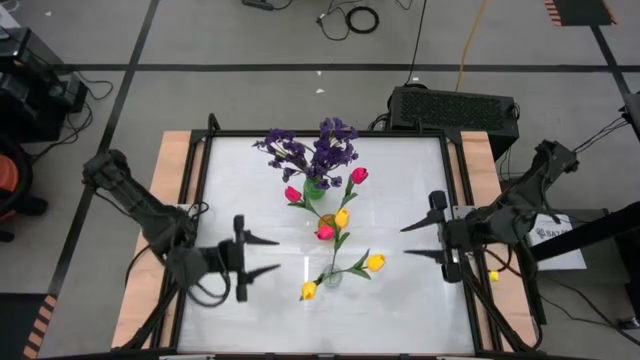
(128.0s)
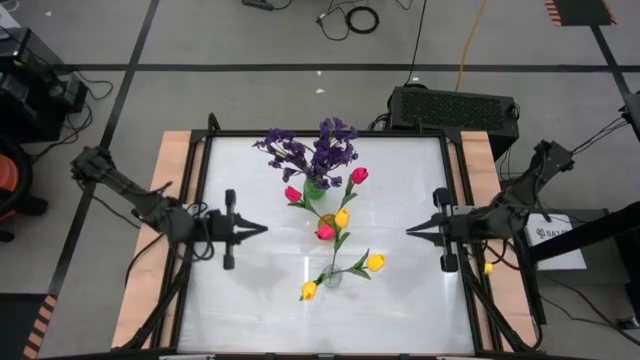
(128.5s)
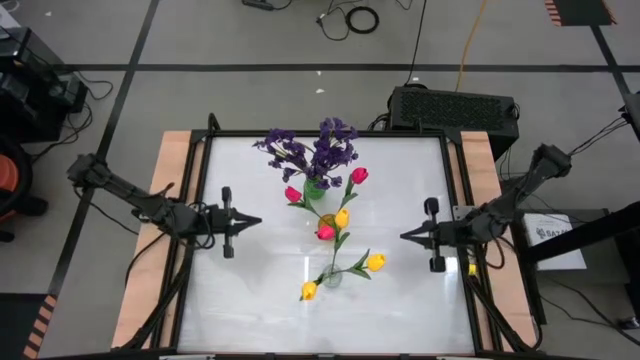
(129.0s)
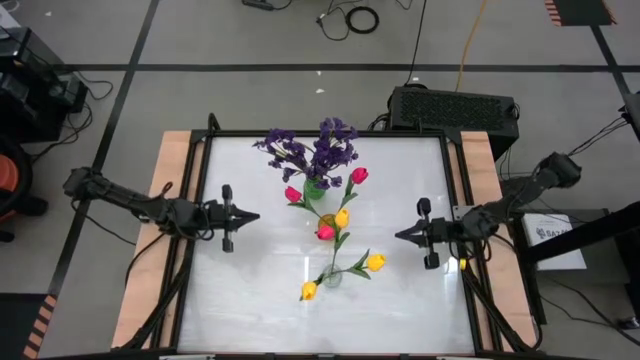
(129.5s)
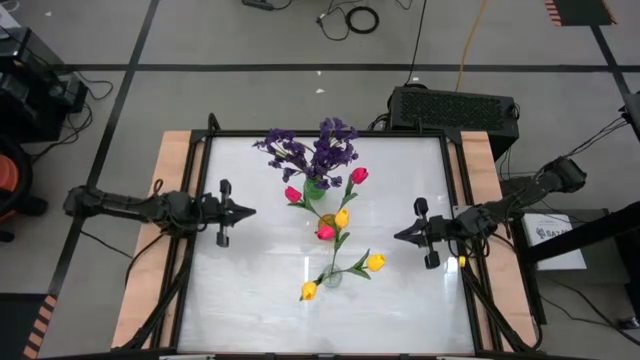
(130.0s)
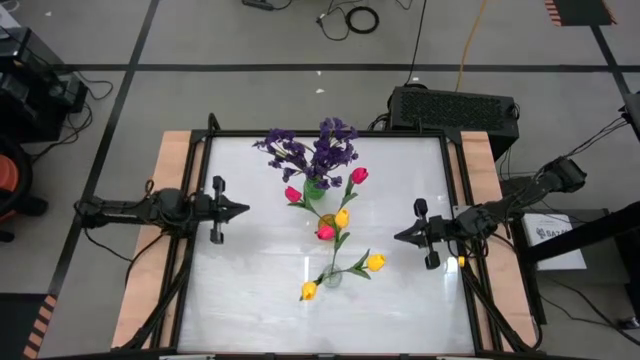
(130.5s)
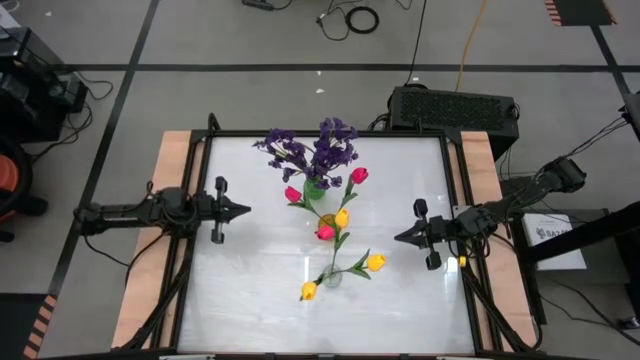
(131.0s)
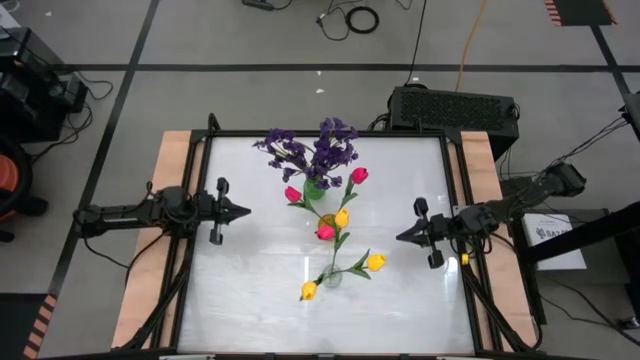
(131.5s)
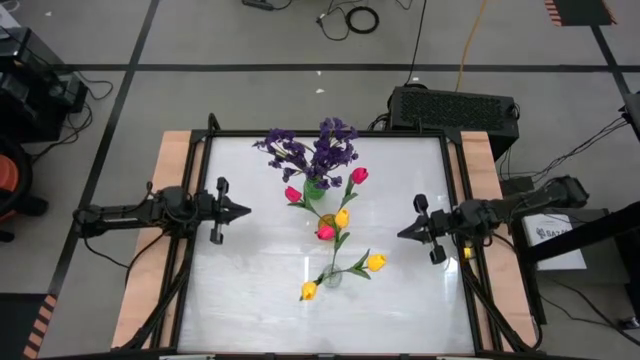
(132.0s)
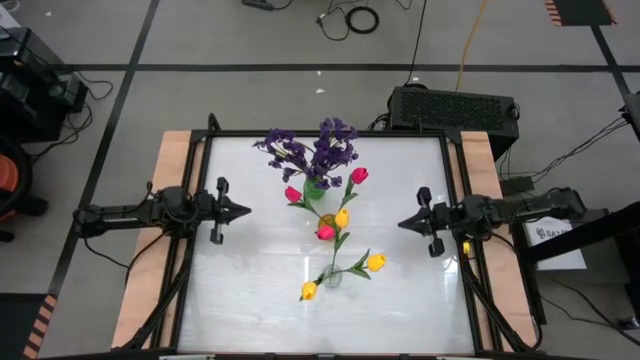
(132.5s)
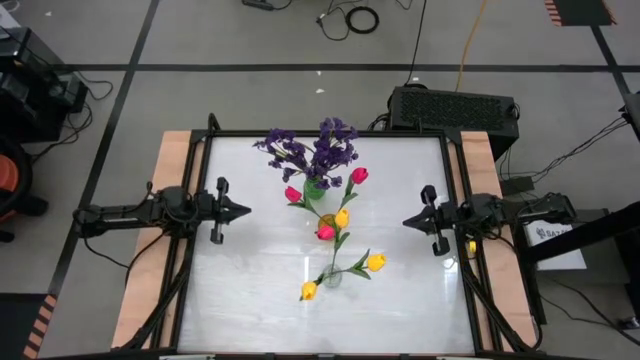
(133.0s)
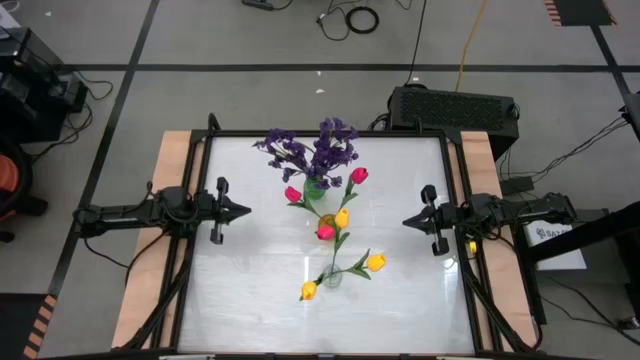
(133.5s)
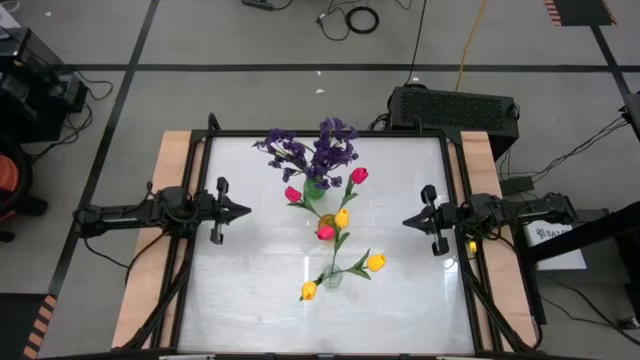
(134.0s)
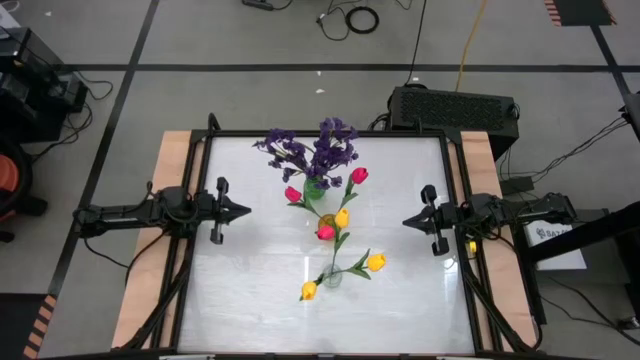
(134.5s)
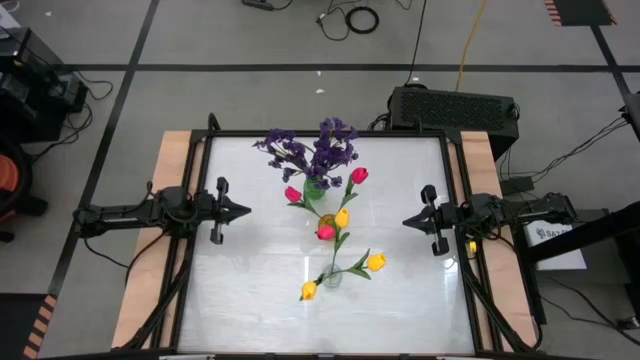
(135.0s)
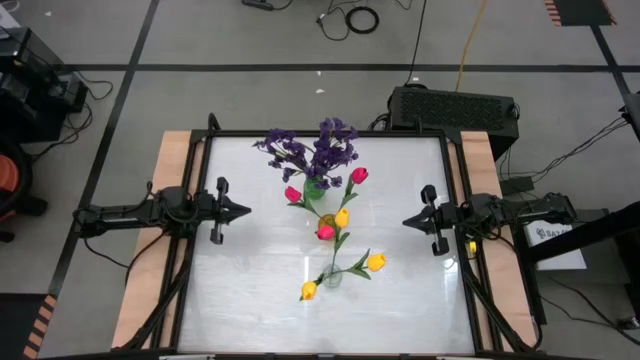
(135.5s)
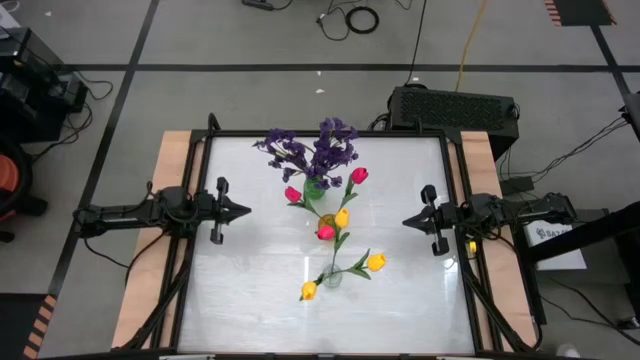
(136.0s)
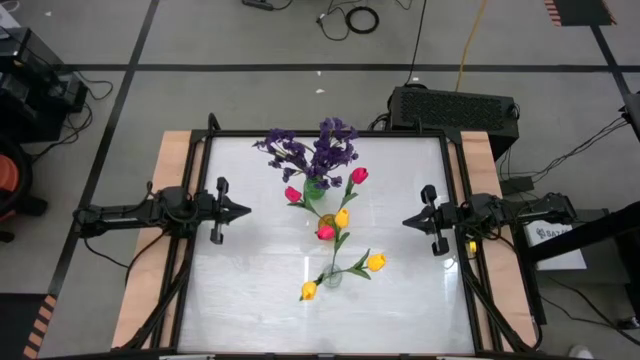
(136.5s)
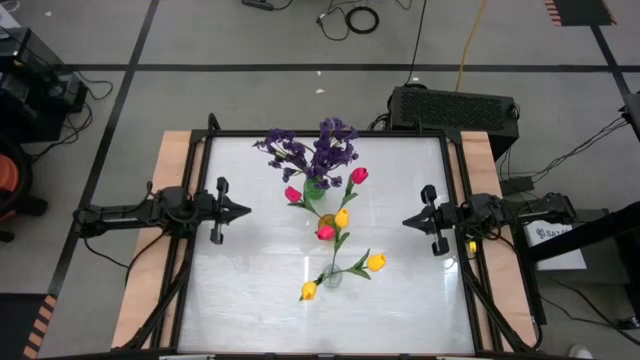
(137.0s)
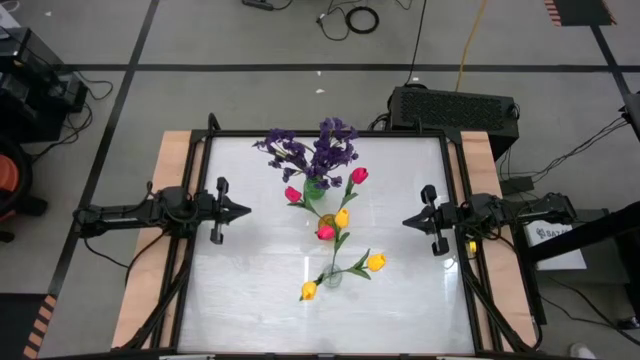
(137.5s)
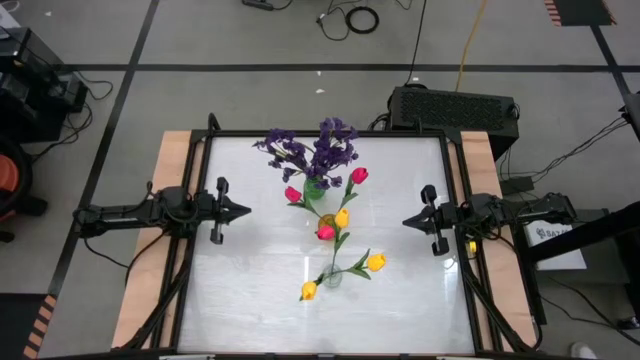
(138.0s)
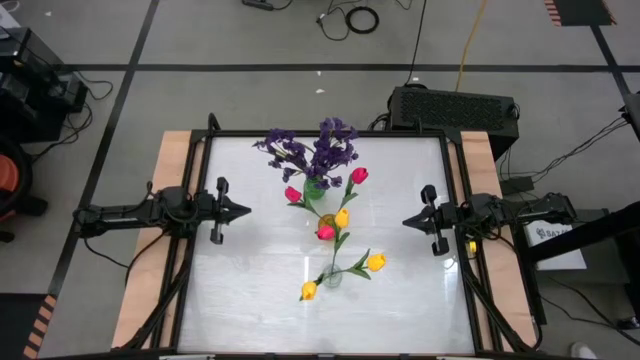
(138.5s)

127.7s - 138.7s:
Task: Sort flowers into vase by color
Return to Home Position

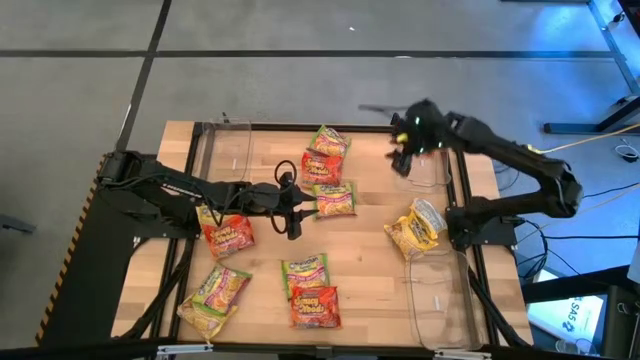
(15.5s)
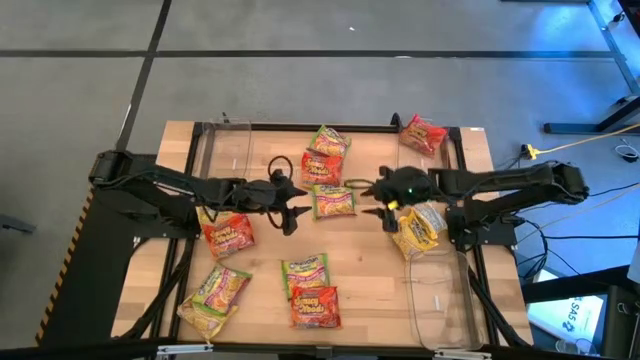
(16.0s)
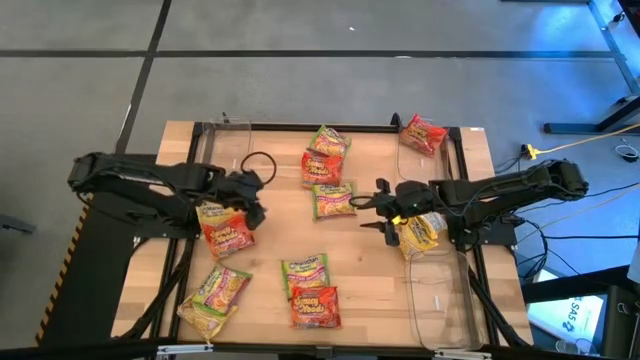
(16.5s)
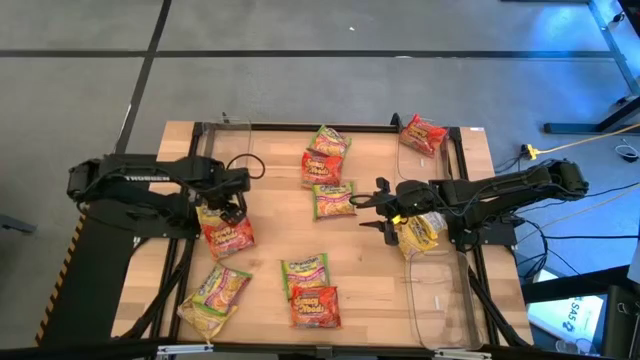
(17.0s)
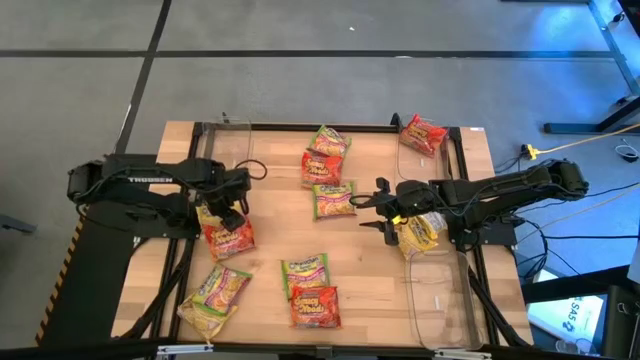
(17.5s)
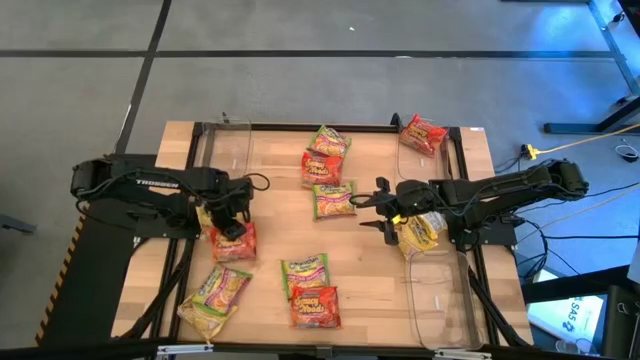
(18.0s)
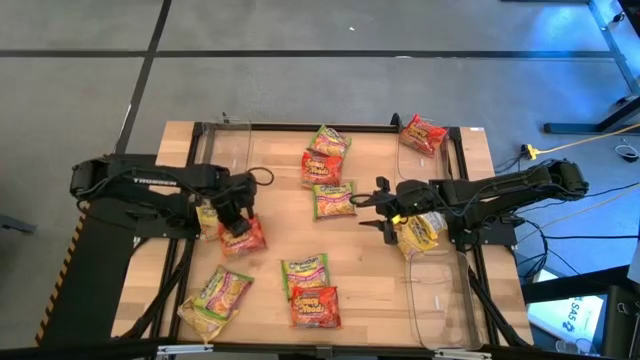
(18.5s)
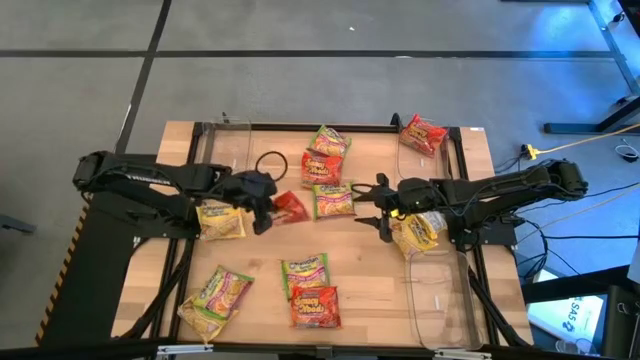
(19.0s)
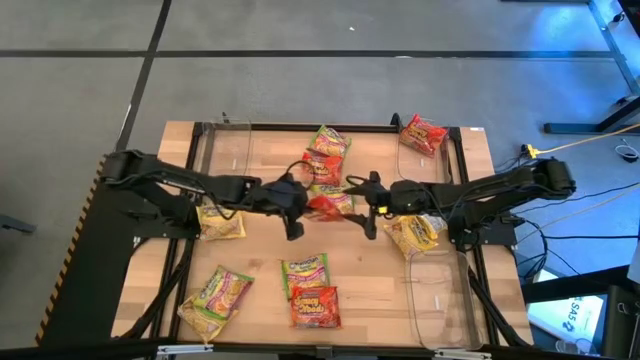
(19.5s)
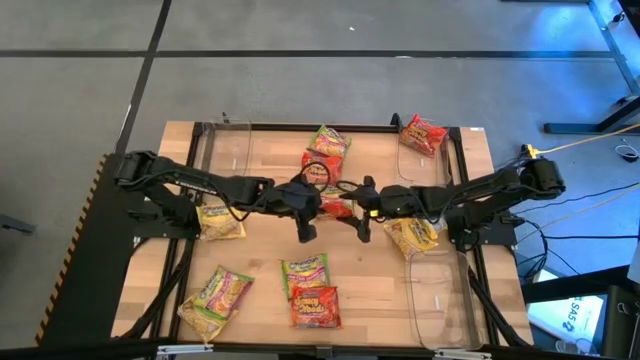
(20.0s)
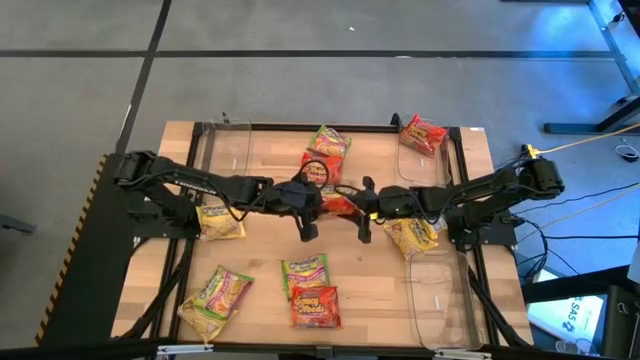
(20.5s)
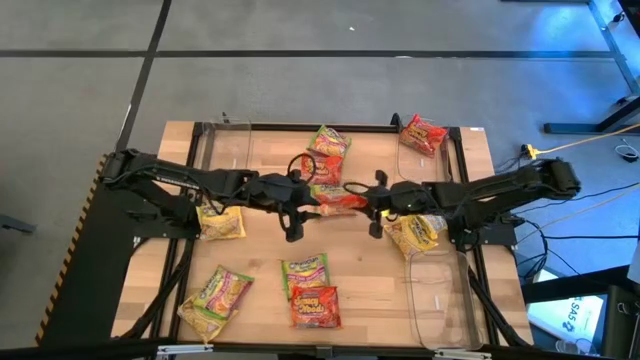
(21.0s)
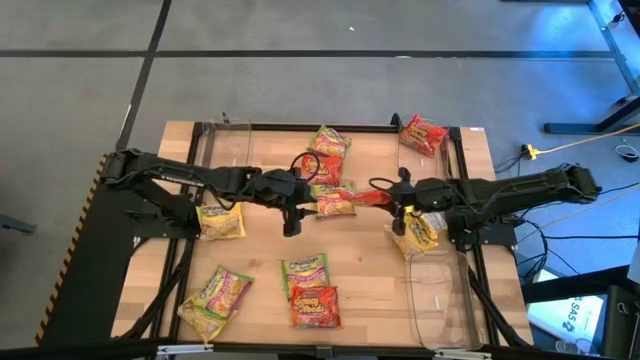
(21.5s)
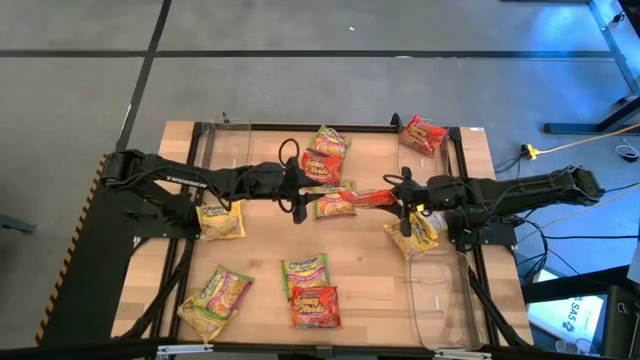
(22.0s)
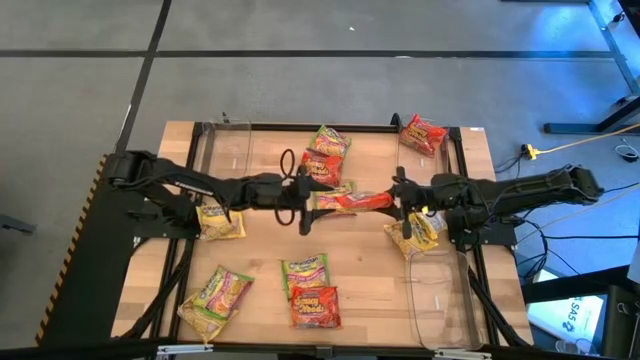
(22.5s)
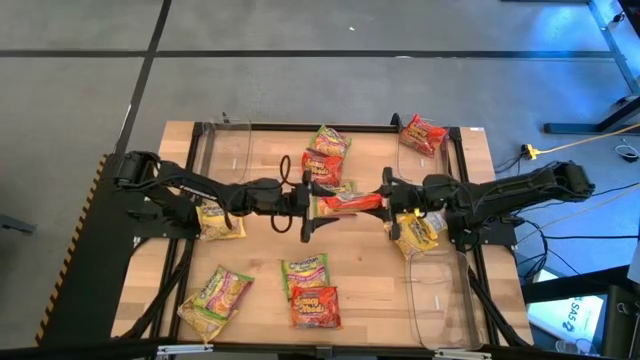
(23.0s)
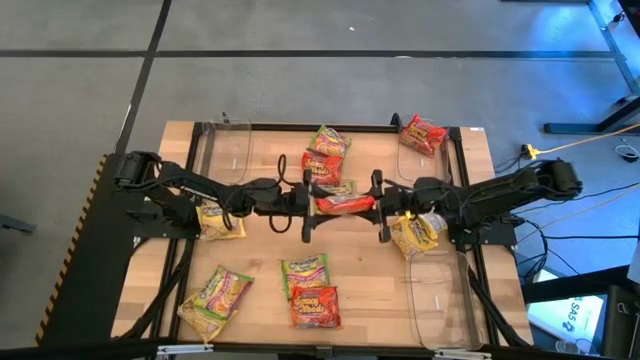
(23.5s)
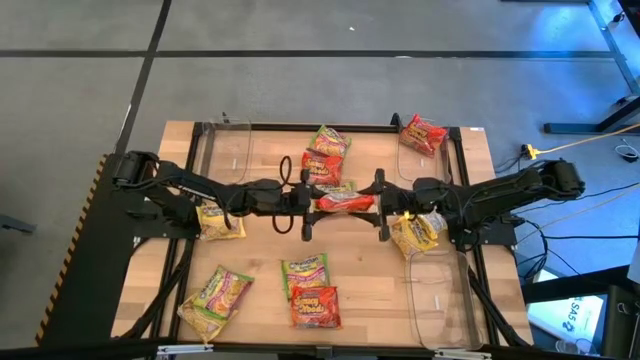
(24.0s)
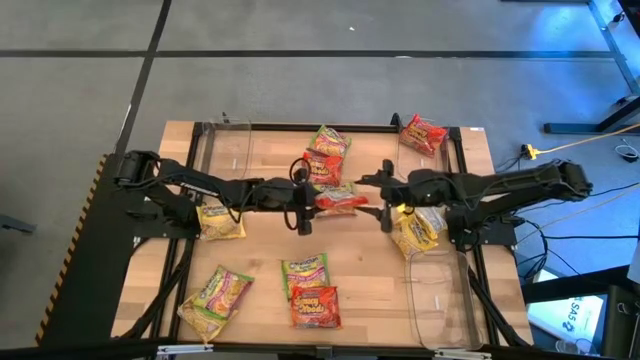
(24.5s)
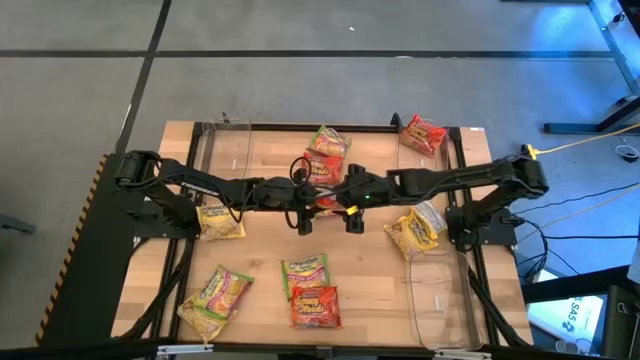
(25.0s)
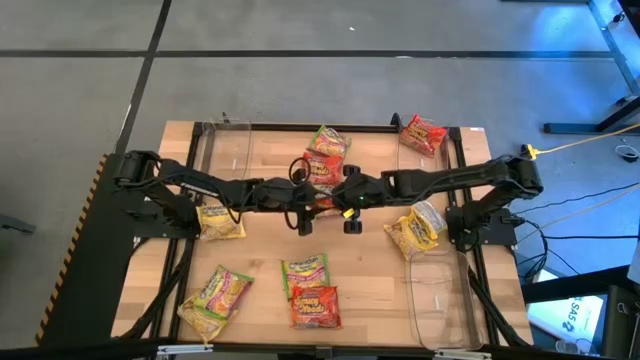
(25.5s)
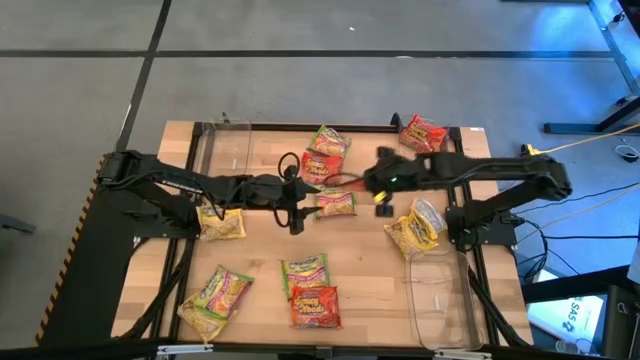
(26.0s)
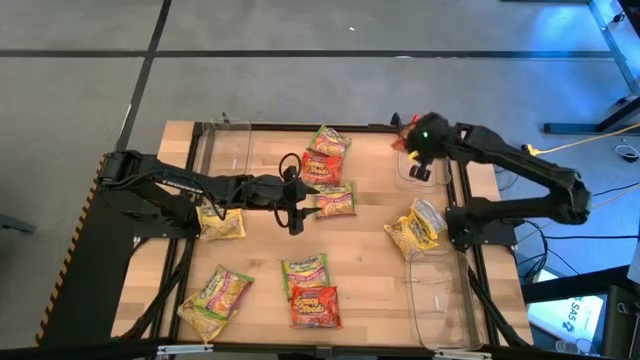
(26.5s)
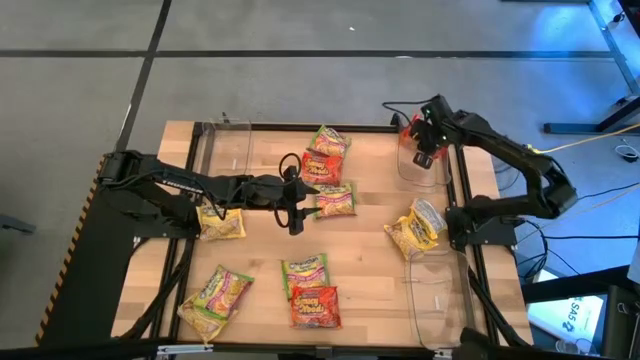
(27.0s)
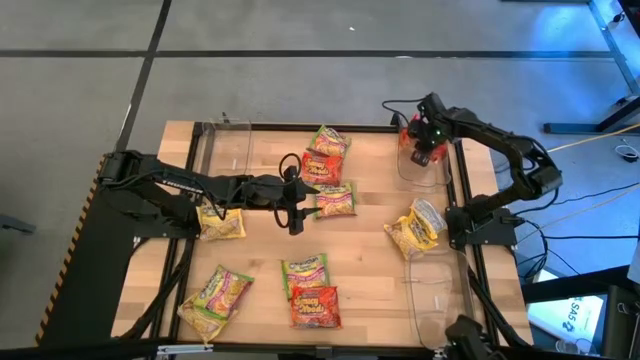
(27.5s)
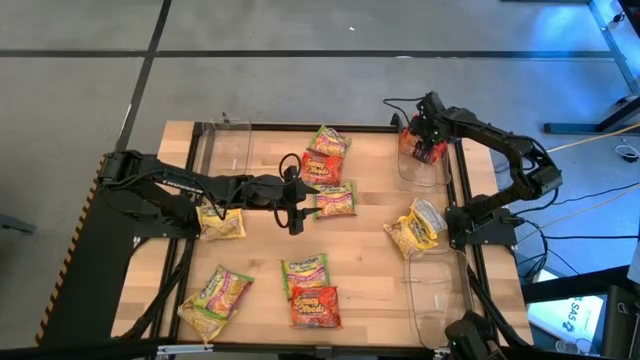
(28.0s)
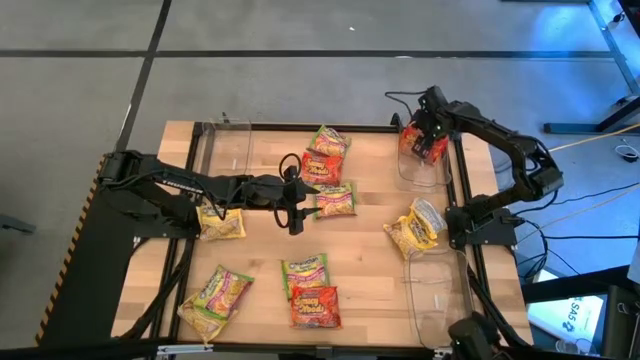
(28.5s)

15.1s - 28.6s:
Task: Sort Maruchan noodles
Put the orange noodle pack into the top right transparent bin
